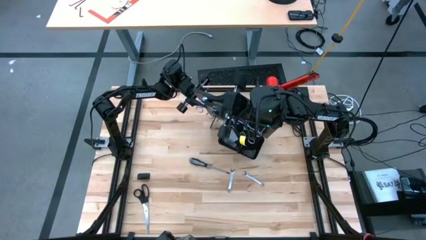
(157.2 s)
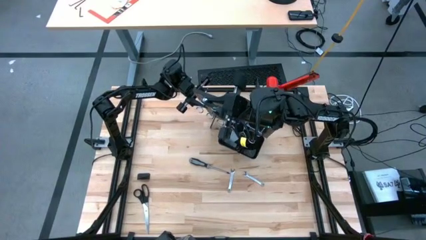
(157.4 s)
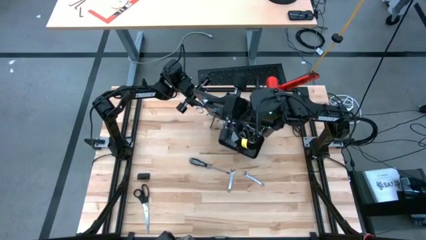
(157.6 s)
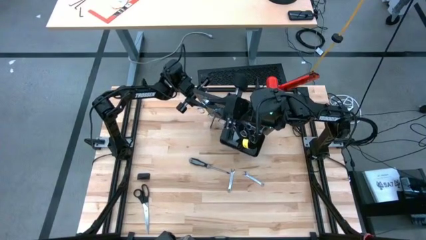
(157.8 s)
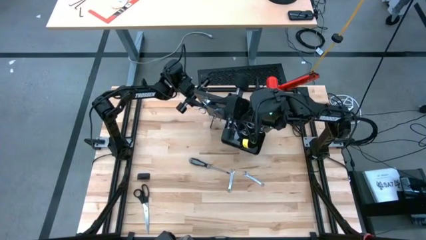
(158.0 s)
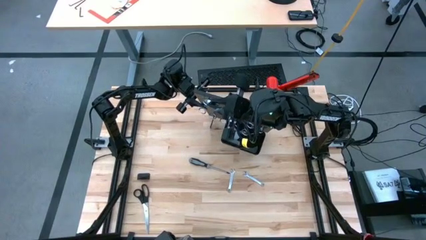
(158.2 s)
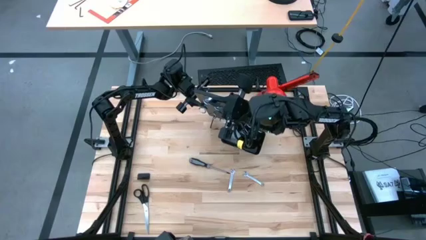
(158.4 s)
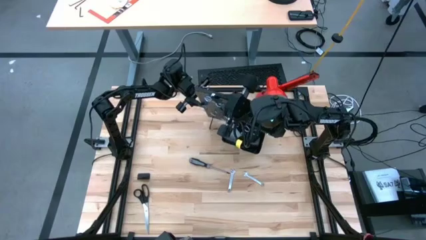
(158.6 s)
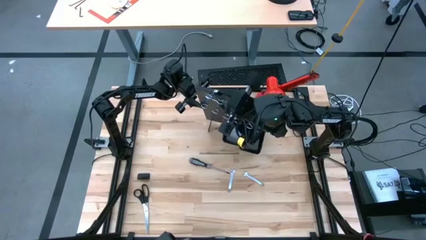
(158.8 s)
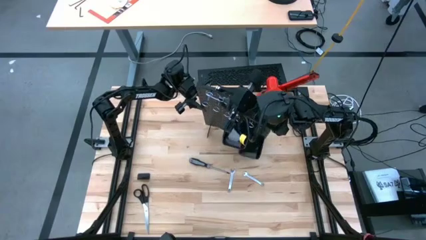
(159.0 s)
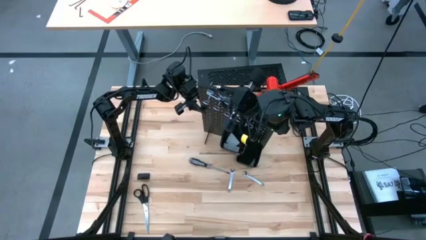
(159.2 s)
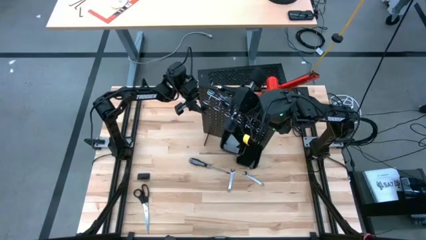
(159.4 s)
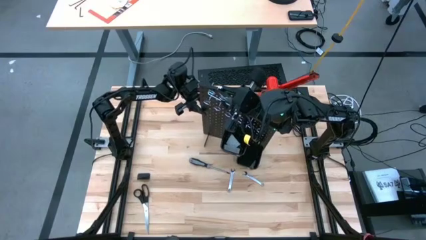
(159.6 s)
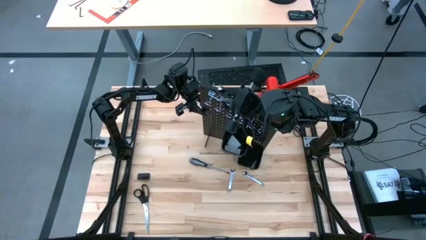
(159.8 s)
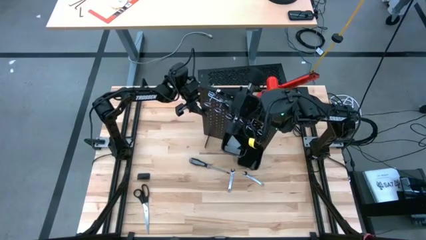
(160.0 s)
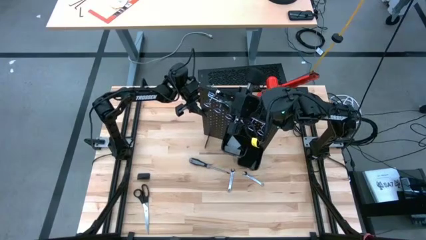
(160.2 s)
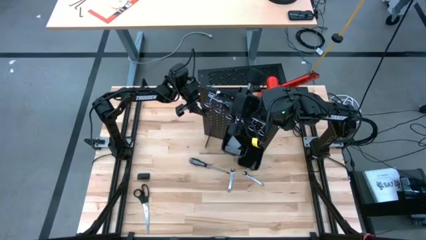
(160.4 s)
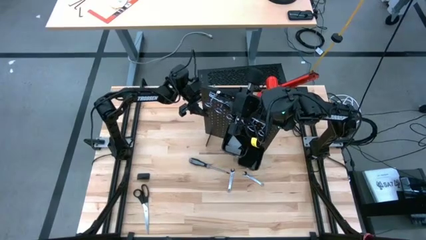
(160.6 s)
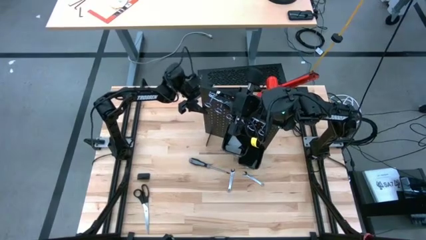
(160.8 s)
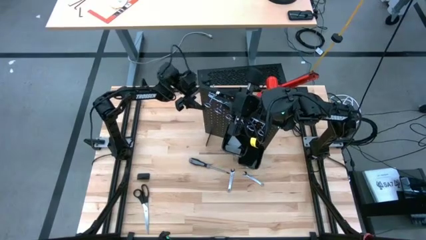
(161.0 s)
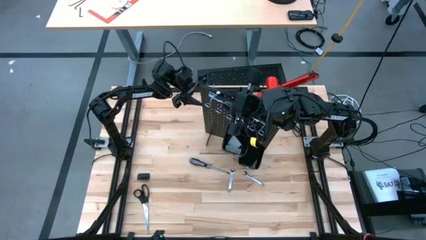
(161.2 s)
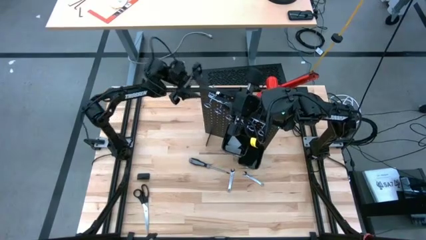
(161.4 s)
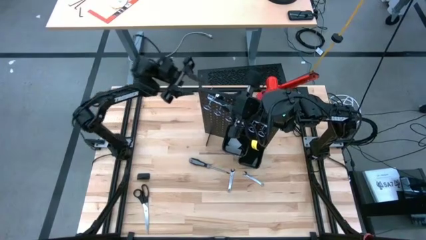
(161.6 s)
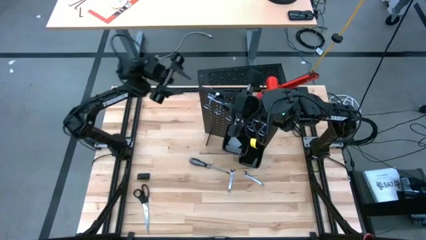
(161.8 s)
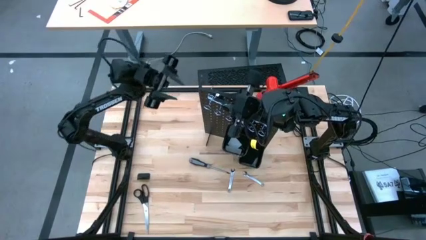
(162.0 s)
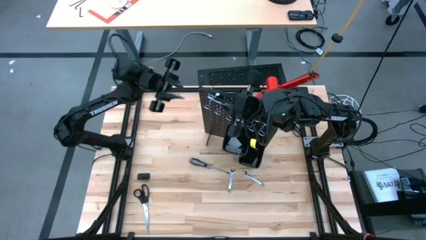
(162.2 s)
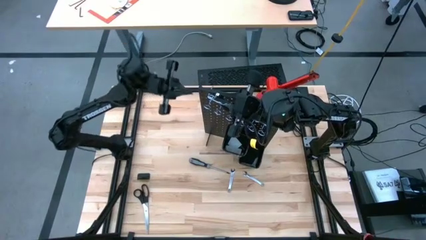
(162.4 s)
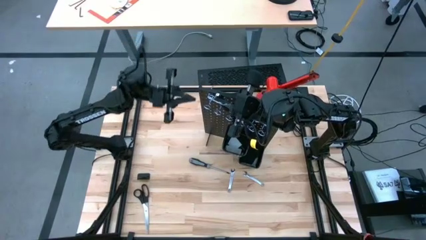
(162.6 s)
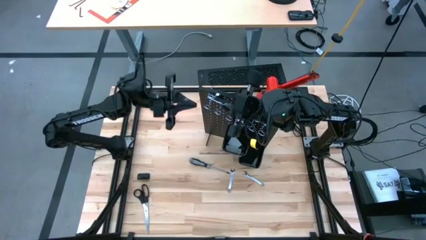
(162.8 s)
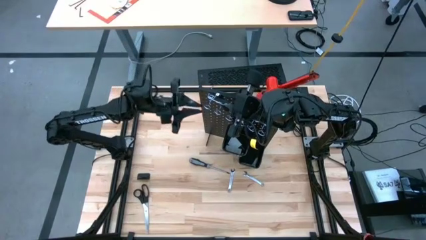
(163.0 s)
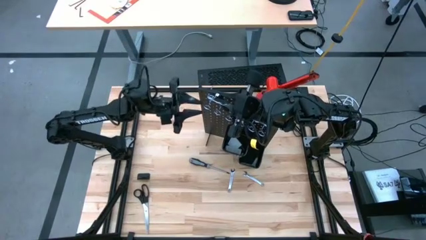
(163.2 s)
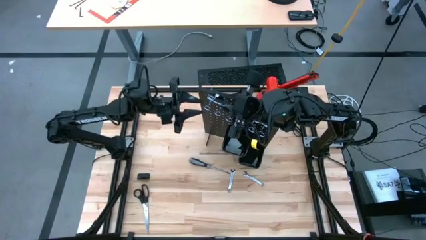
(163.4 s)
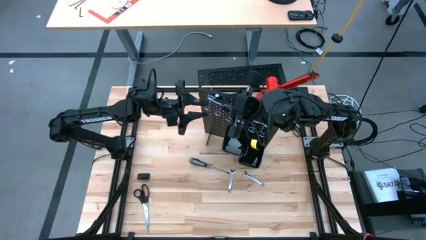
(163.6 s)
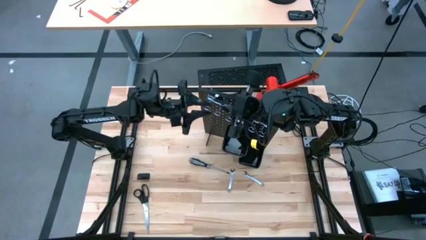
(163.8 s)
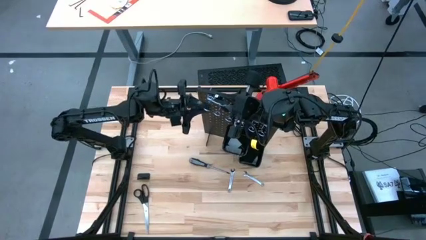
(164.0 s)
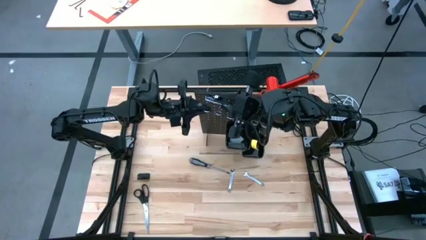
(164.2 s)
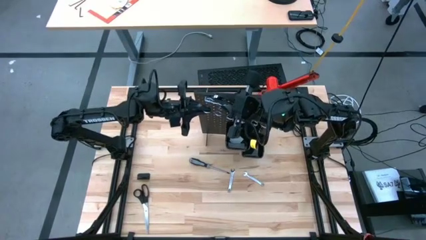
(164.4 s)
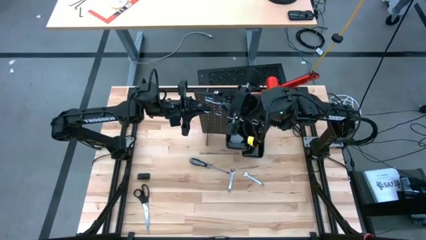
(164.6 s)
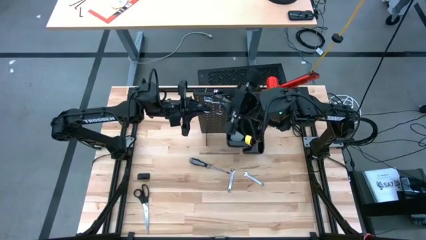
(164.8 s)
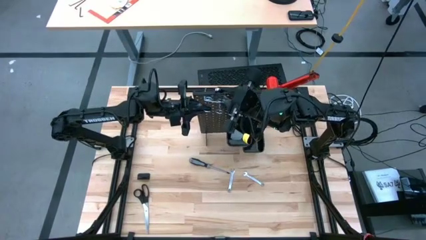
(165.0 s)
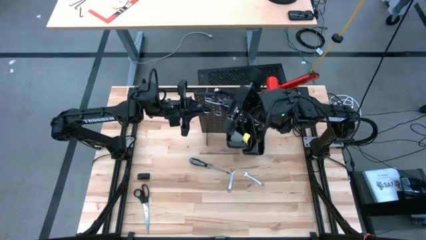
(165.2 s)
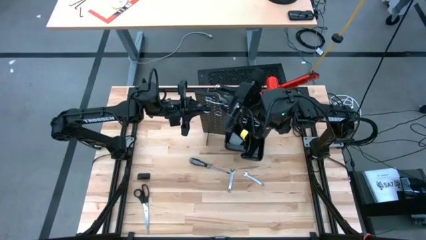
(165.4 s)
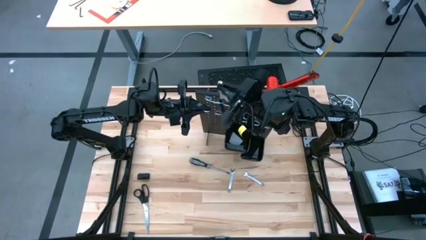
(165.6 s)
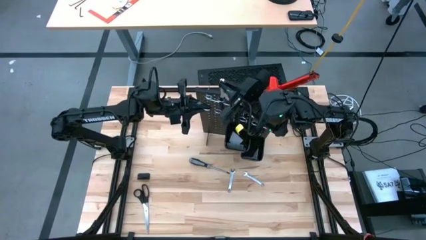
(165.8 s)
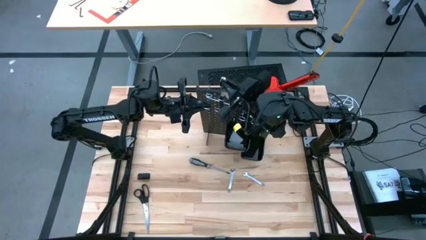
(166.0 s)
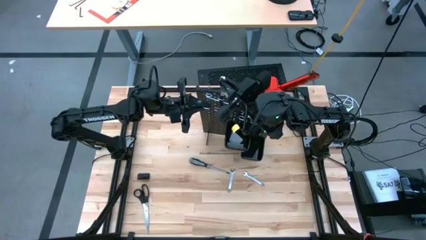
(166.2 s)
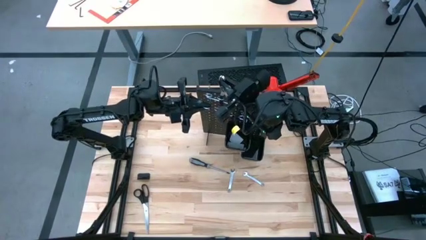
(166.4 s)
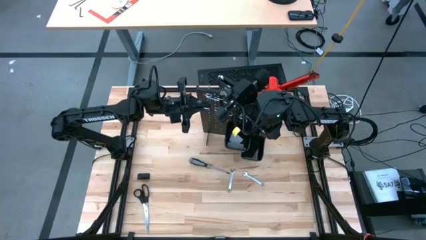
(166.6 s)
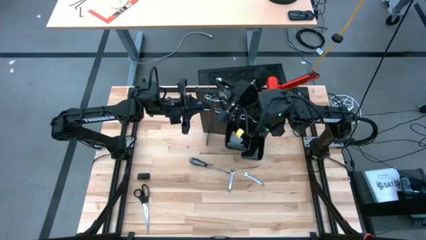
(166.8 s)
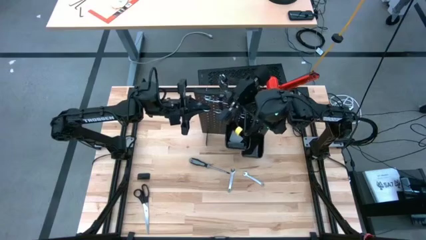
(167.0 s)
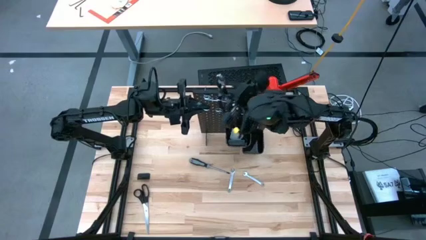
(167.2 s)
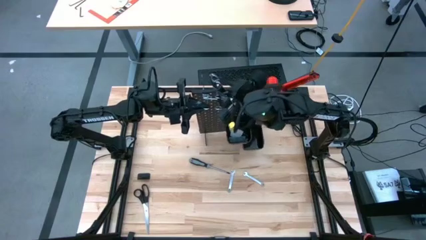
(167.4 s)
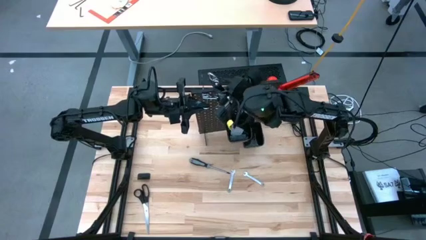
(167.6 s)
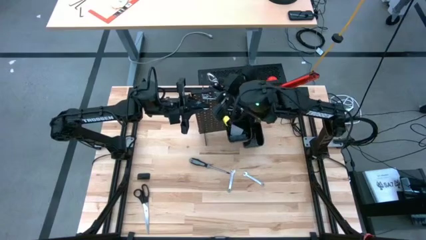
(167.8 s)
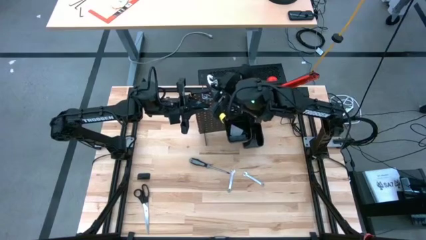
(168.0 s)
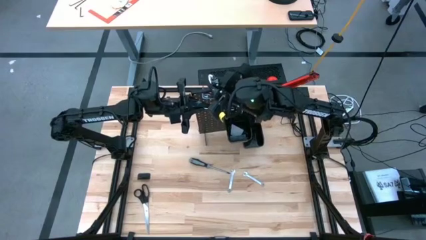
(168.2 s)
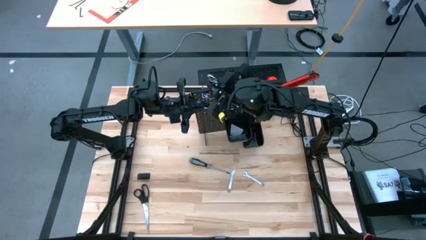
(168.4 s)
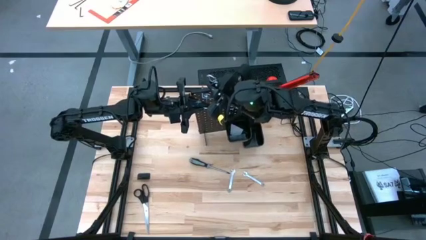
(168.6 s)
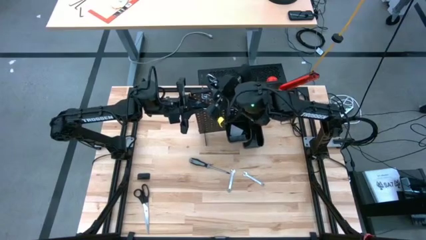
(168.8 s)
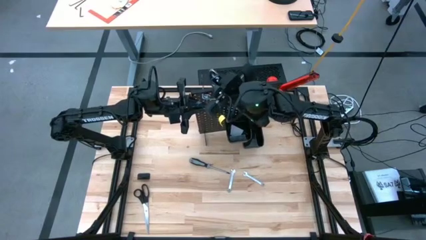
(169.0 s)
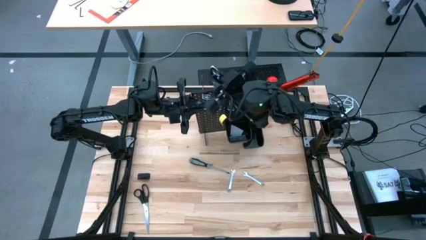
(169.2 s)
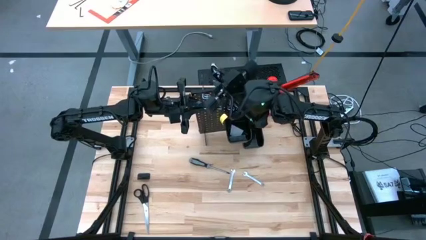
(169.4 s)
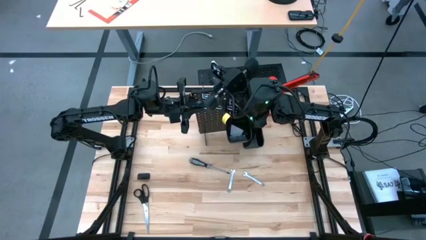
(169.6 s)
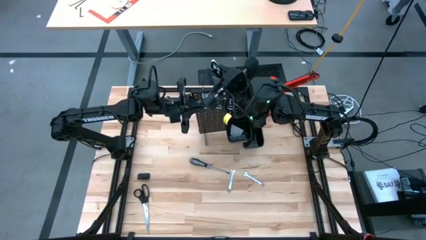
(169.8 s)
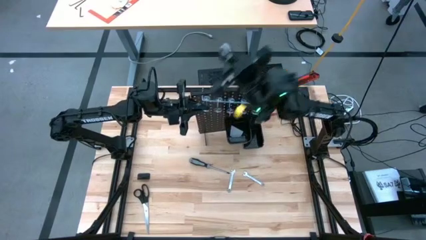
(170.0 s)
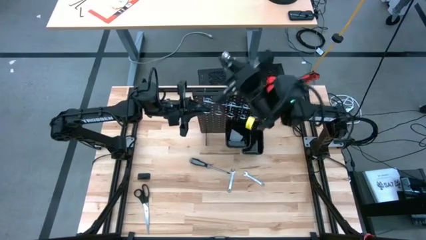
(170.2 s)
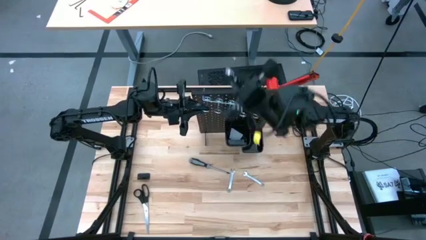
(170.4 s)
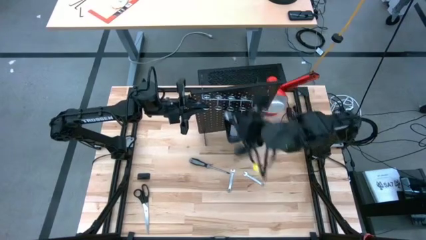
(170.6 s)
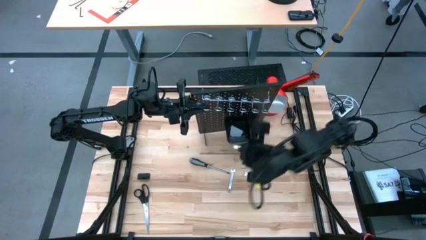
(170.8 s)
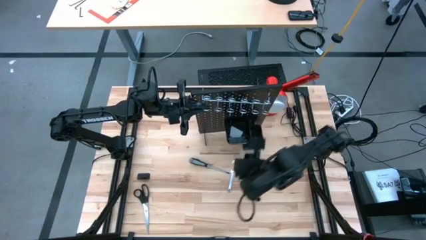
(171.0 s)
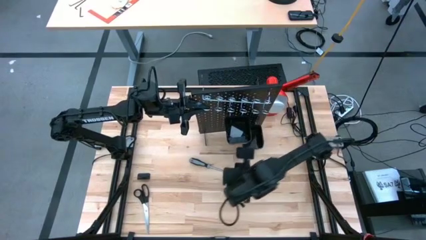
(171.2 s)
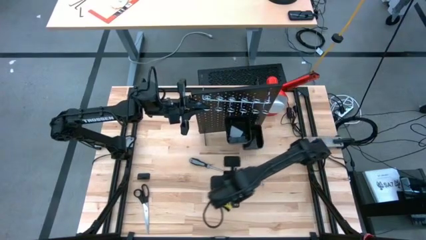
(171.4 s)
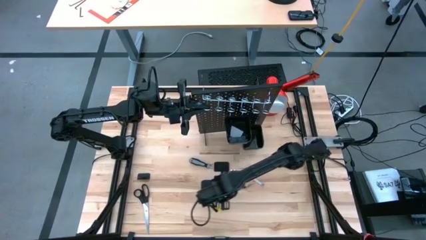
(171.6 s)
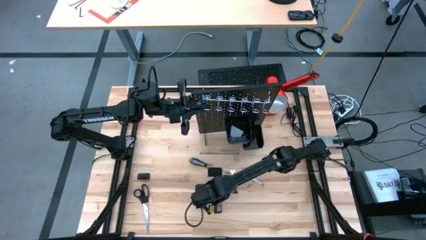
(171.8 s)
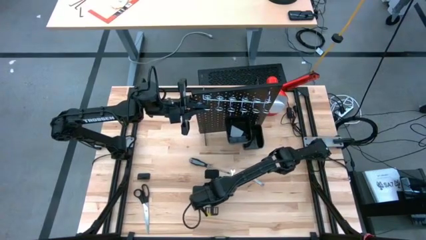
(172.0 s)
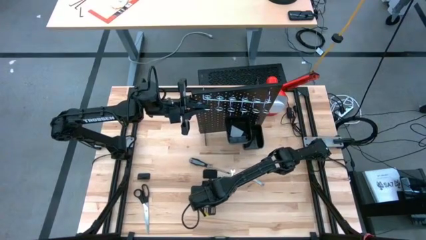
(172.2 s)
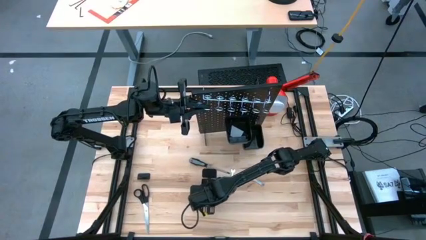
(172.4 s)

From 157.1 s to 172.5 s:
Task: Hang tools onto peg board
Unhang the pliers from the pegboard
